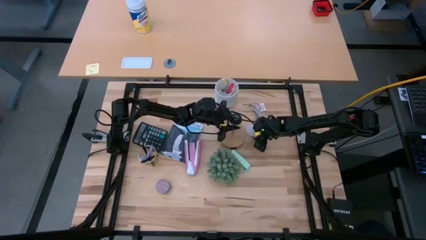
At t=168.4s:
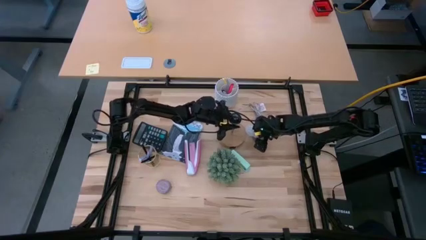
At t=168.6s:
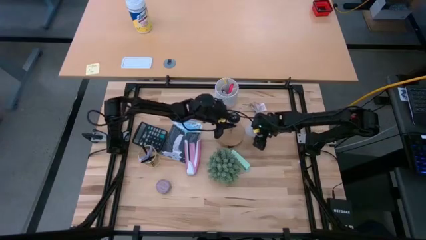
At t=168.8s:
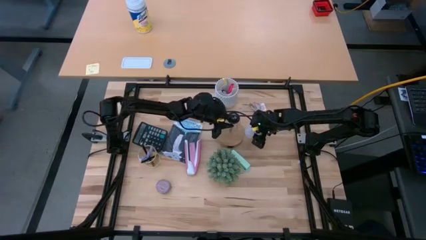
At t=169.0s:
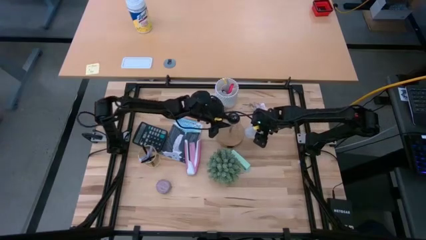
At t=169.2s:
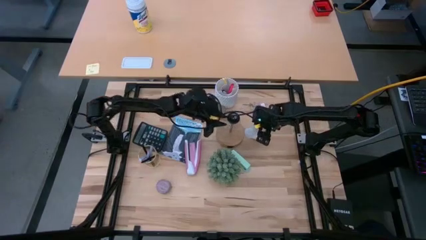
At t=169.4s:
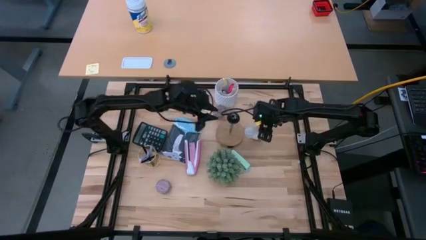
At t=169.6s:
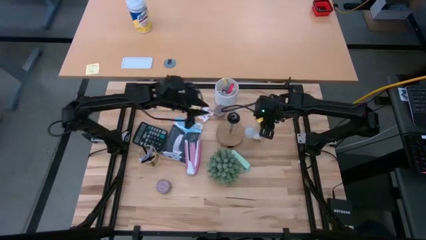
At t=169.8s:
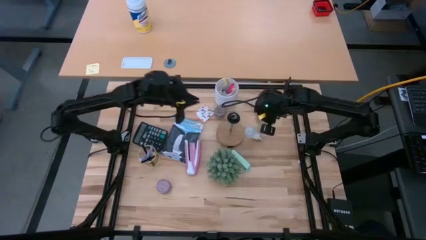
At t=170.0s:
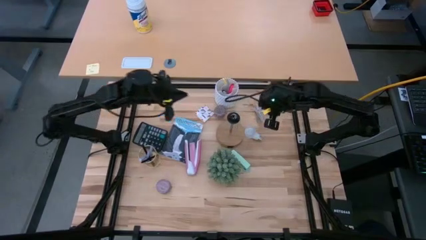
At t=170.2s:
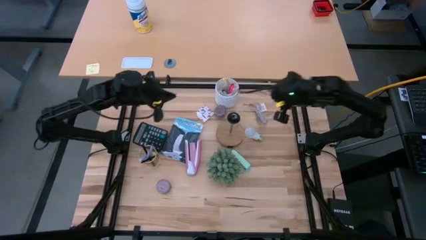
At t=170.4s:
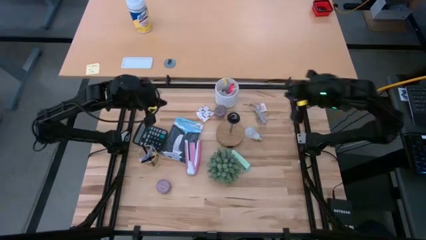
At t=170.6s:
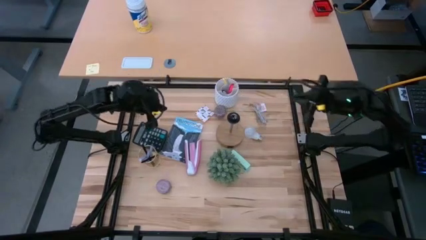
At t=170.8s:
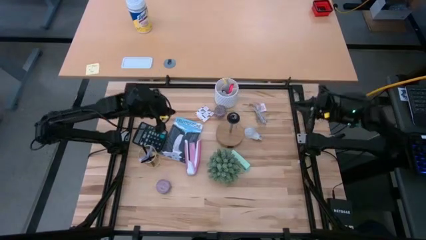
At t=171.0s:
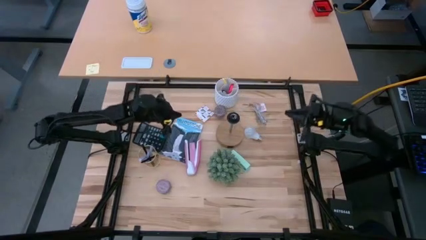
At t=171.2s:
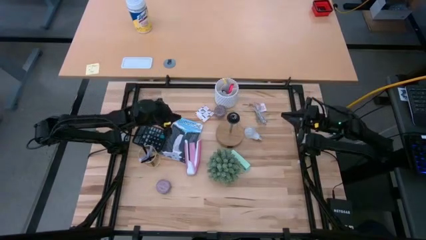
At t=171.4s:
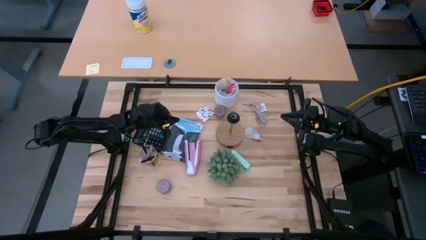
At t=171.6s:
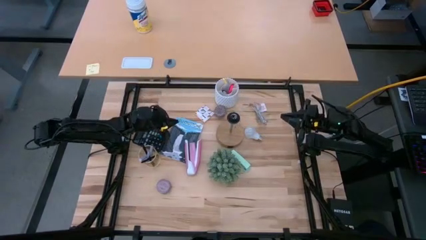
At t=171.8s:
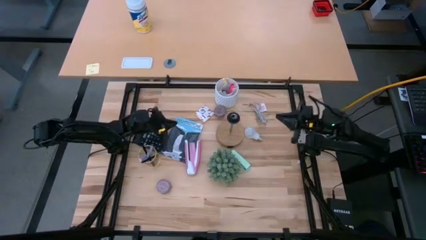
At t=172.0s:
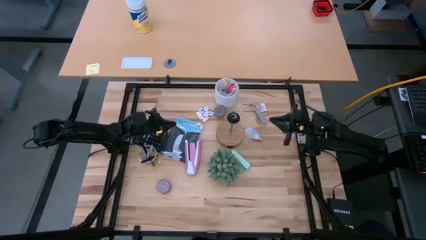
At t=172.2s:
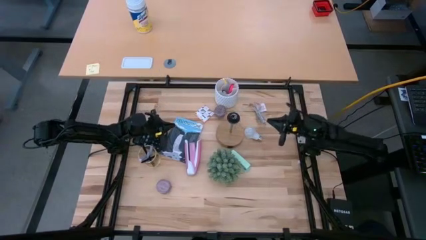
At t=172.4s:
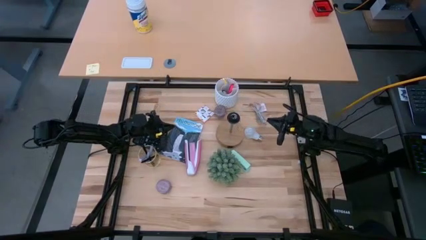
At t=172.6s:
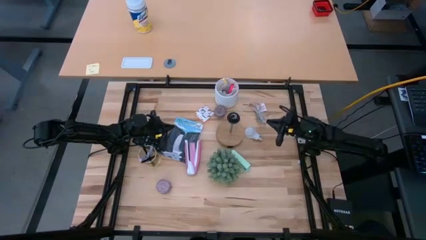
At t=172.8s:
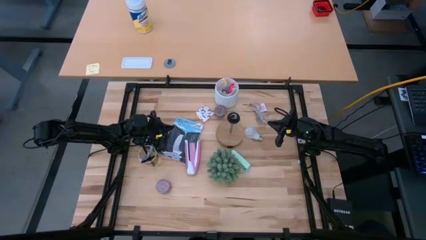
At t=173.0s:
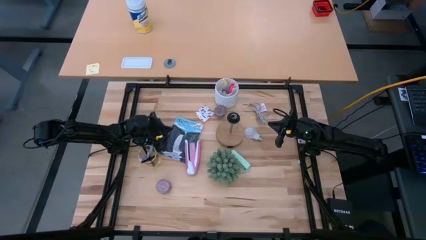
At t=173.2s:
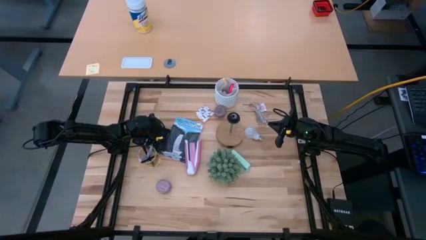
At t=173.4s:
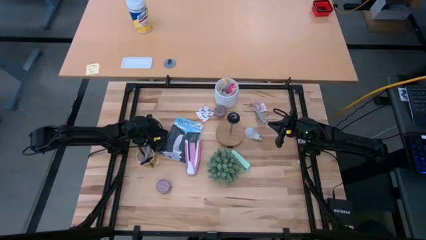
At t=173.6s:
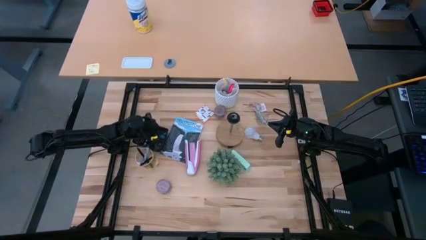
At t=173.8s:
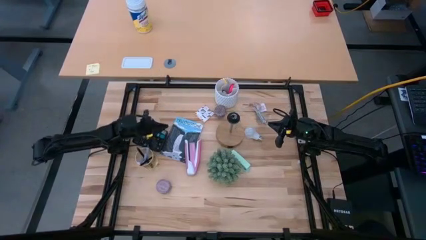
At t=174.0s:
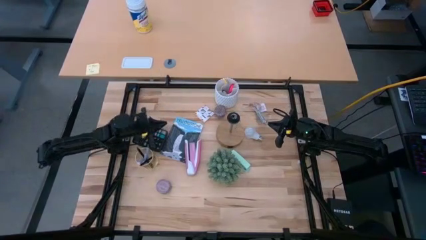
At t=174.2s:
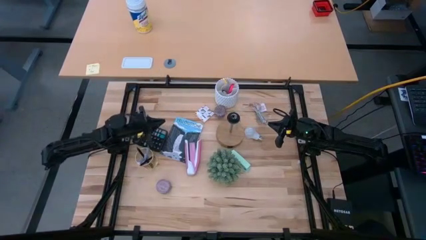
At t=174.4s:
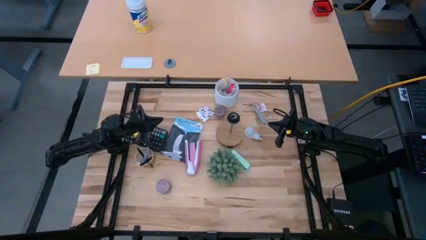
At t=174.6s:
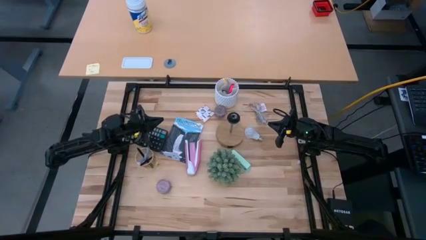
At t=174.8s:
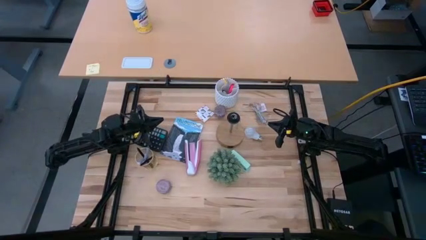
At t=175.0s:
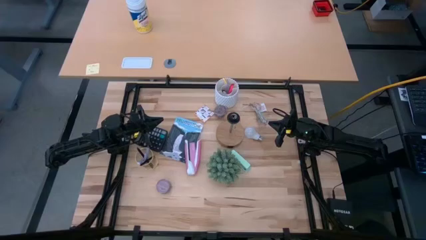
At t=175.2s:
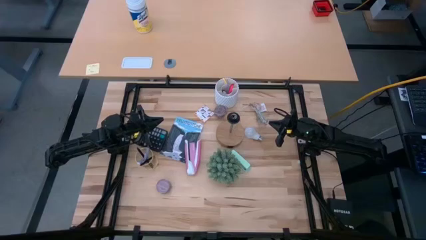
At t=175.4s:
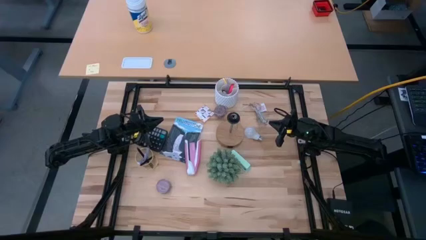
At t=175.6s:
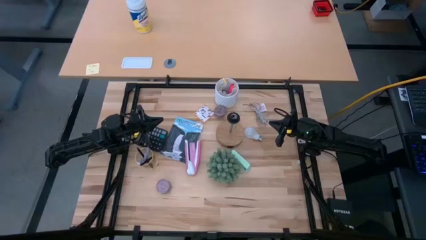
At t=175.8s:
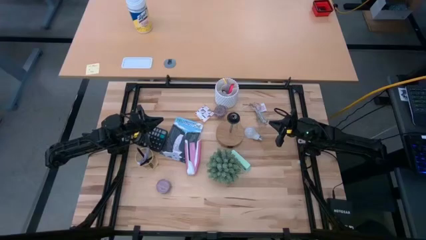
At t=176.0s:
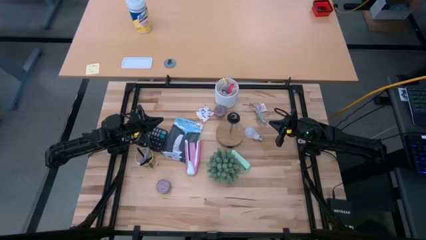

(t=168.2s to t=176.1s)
Task: Screw lightbulb
Return to Home Position
